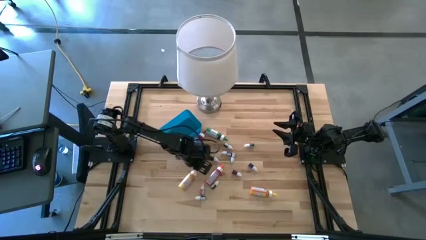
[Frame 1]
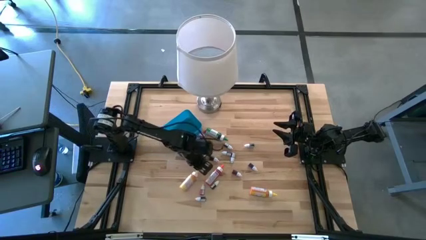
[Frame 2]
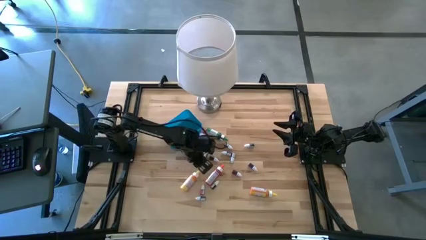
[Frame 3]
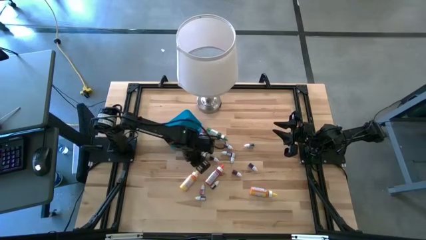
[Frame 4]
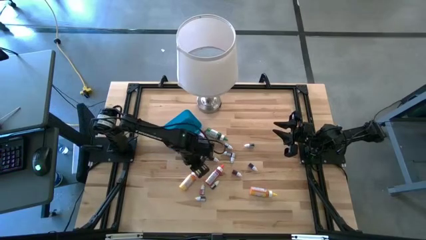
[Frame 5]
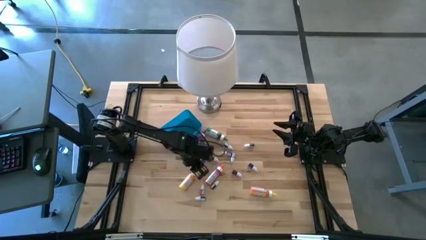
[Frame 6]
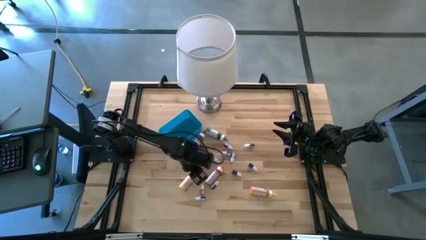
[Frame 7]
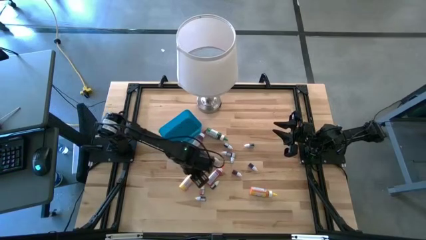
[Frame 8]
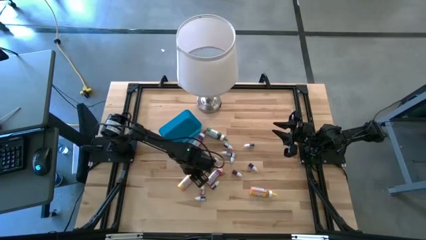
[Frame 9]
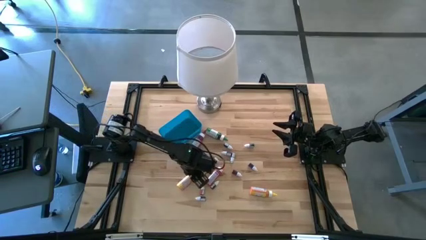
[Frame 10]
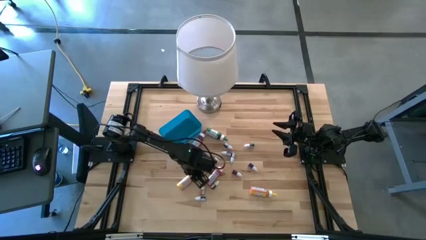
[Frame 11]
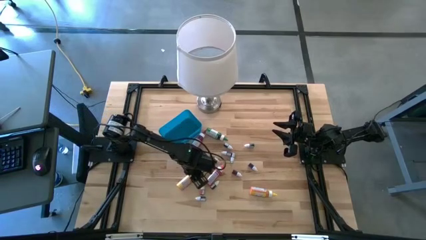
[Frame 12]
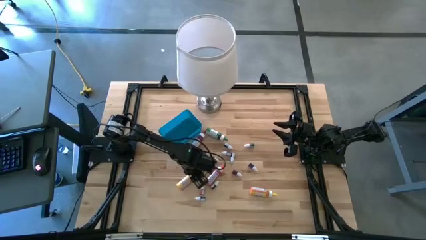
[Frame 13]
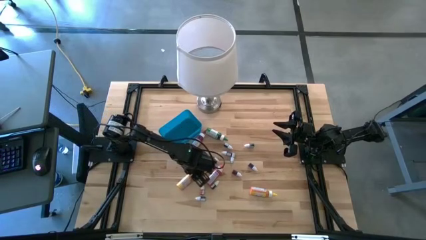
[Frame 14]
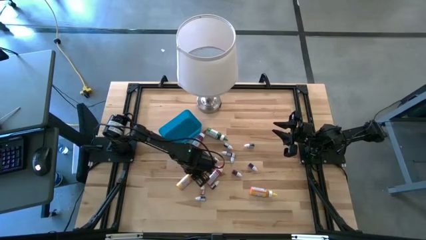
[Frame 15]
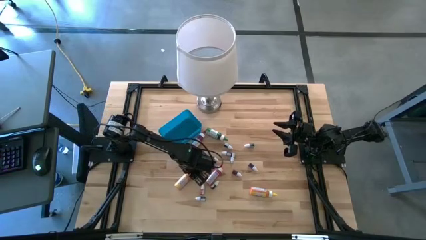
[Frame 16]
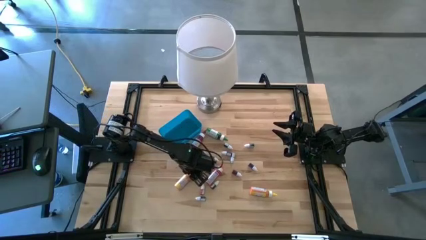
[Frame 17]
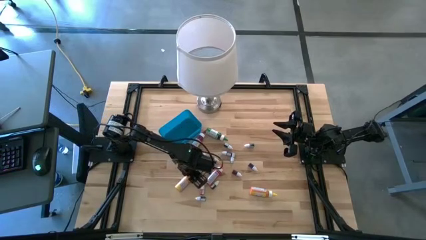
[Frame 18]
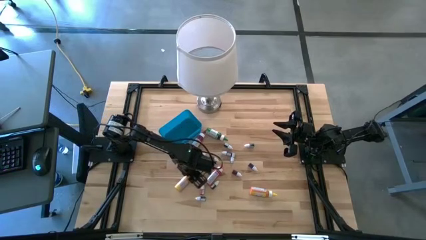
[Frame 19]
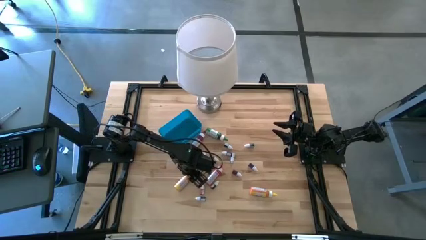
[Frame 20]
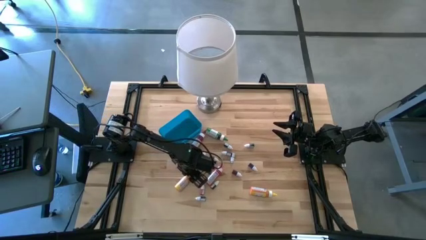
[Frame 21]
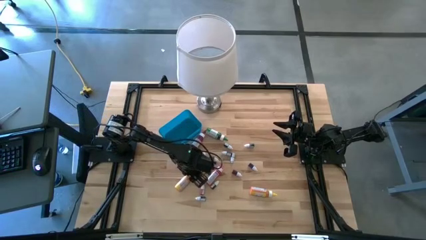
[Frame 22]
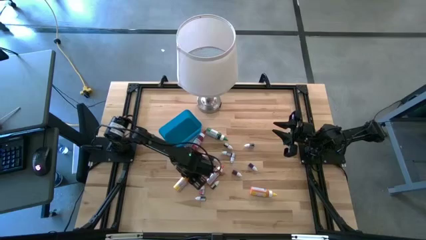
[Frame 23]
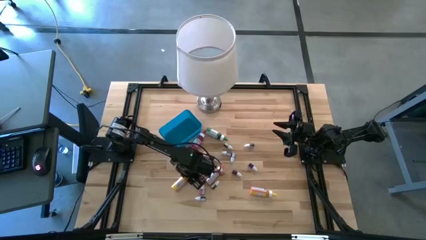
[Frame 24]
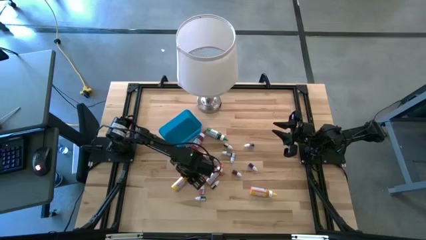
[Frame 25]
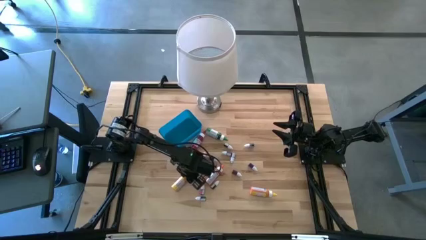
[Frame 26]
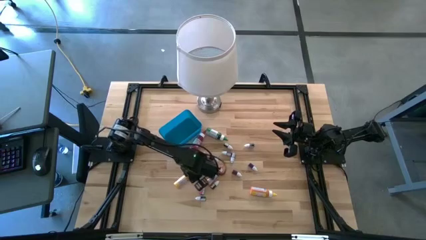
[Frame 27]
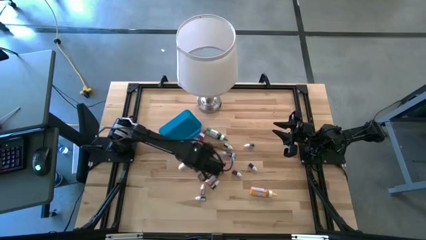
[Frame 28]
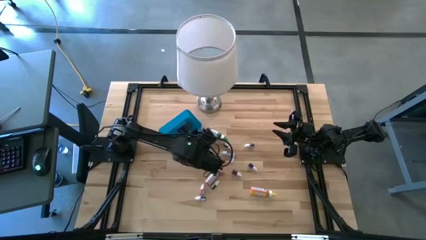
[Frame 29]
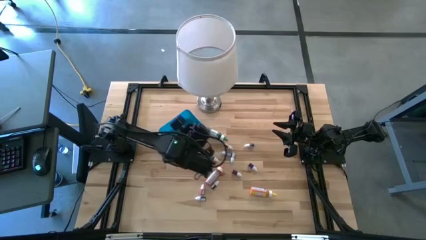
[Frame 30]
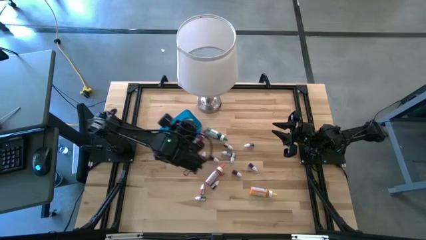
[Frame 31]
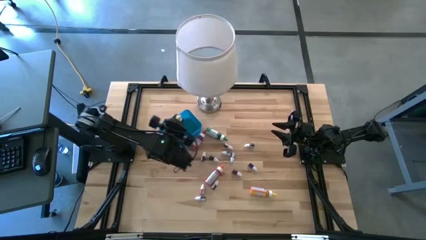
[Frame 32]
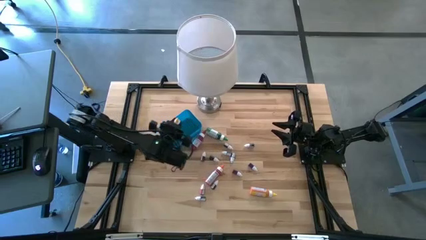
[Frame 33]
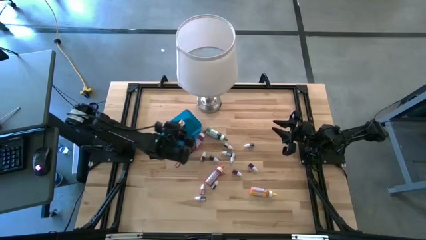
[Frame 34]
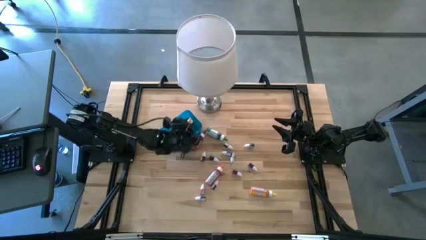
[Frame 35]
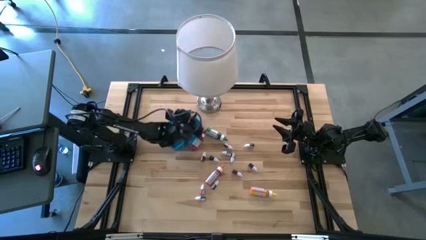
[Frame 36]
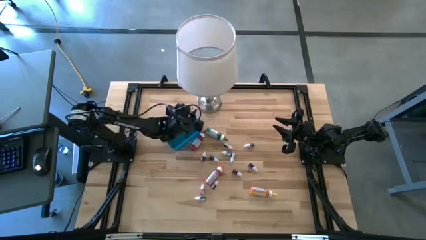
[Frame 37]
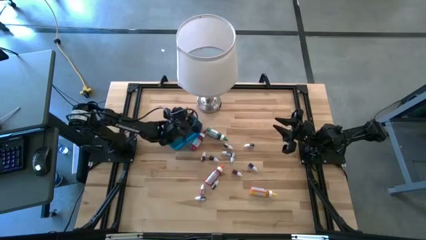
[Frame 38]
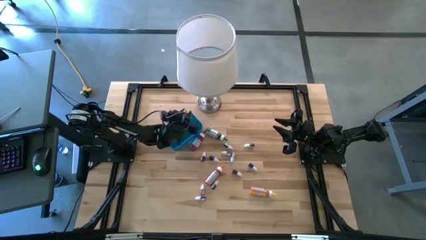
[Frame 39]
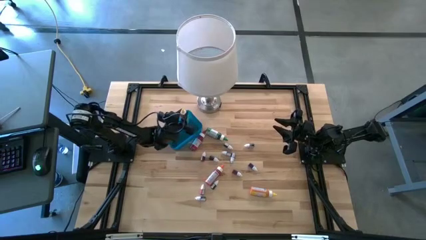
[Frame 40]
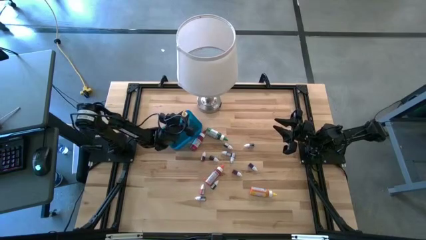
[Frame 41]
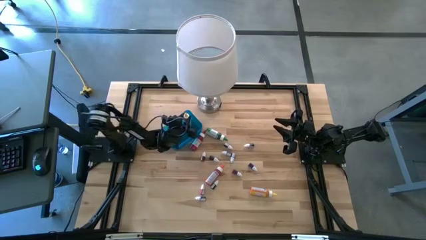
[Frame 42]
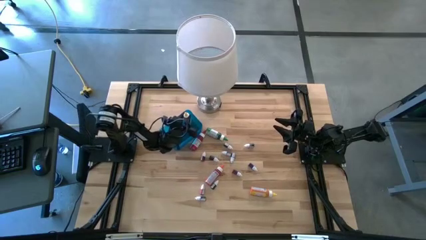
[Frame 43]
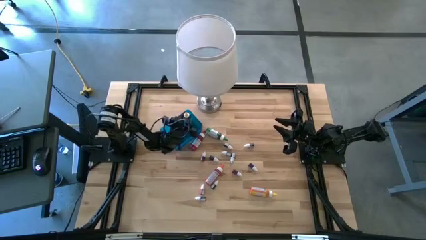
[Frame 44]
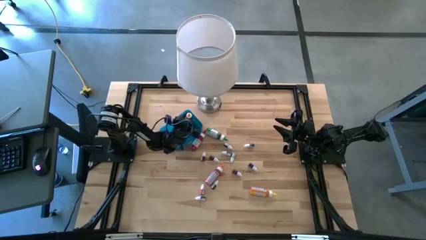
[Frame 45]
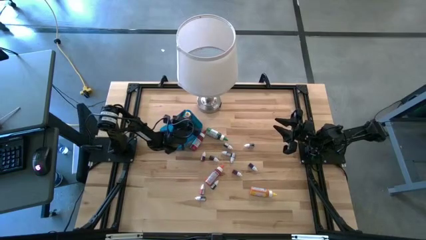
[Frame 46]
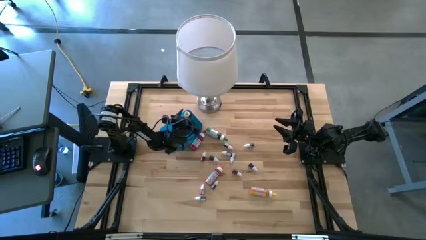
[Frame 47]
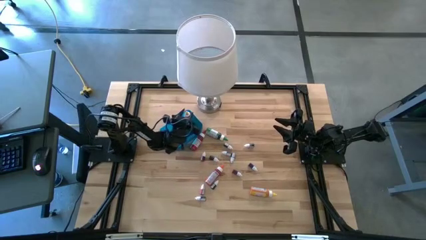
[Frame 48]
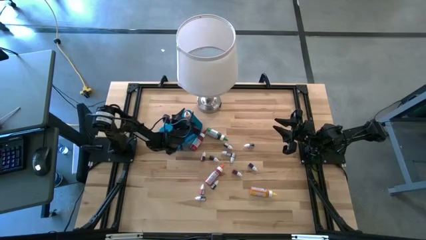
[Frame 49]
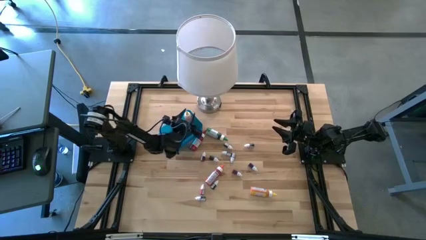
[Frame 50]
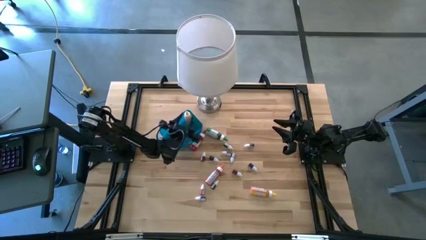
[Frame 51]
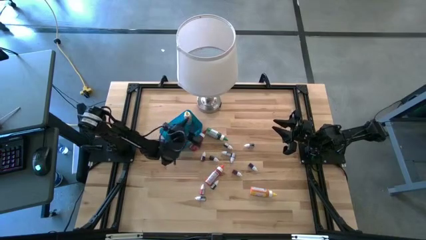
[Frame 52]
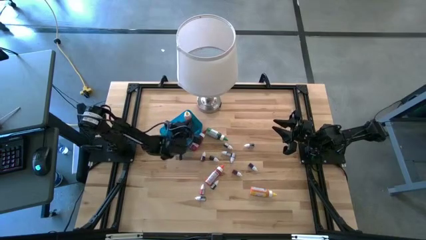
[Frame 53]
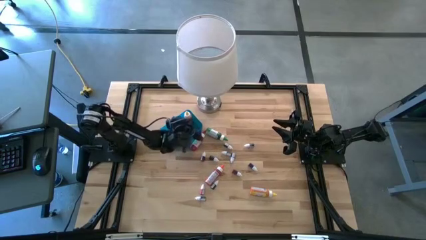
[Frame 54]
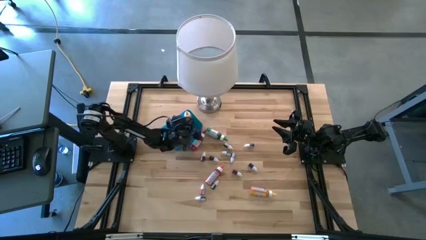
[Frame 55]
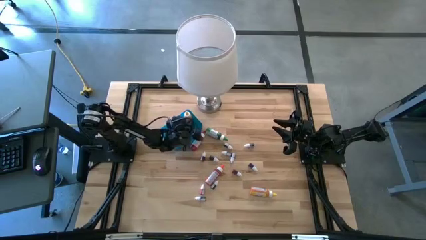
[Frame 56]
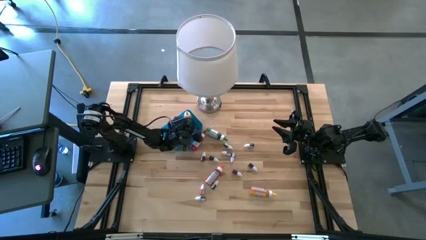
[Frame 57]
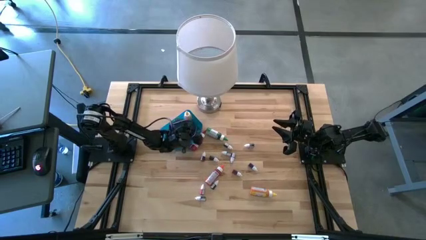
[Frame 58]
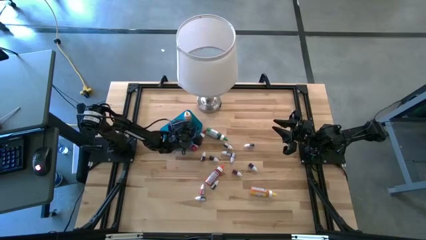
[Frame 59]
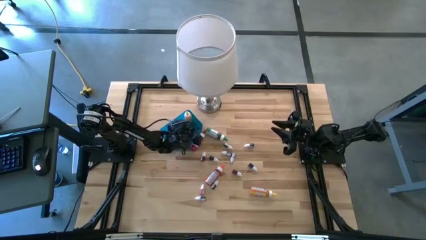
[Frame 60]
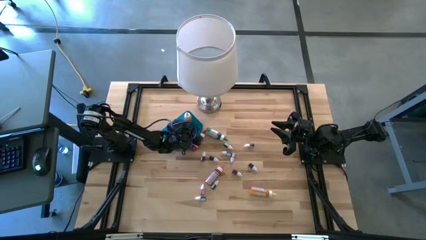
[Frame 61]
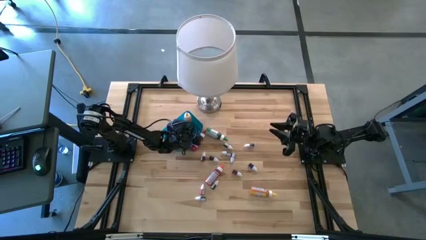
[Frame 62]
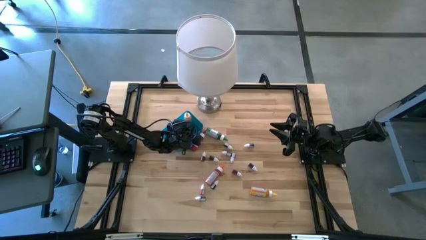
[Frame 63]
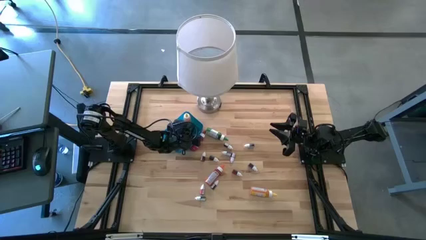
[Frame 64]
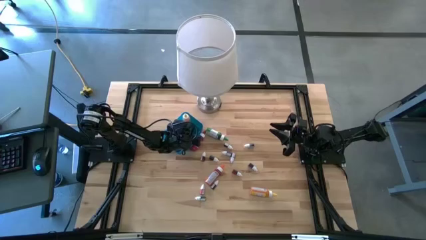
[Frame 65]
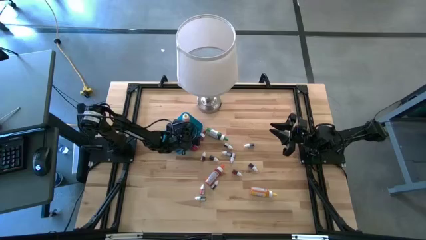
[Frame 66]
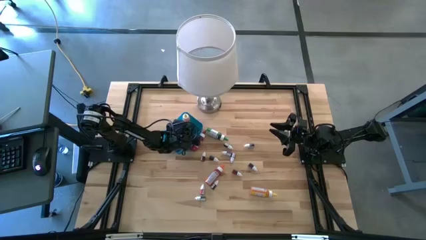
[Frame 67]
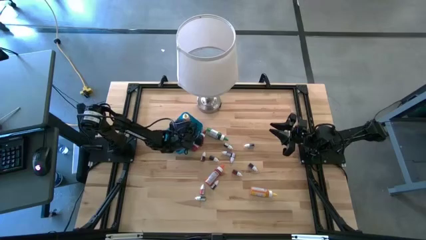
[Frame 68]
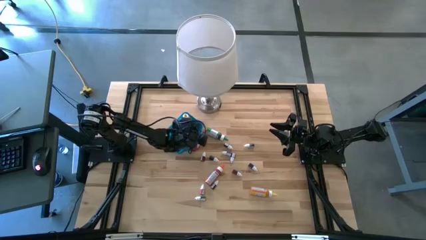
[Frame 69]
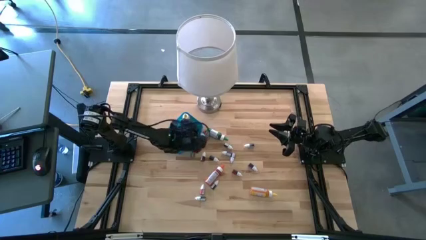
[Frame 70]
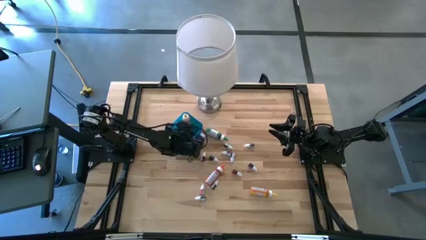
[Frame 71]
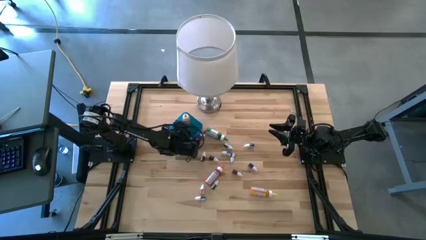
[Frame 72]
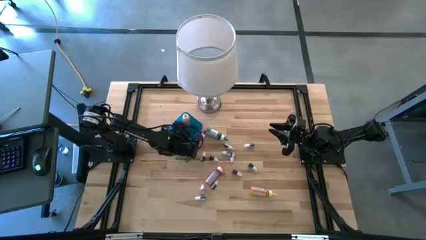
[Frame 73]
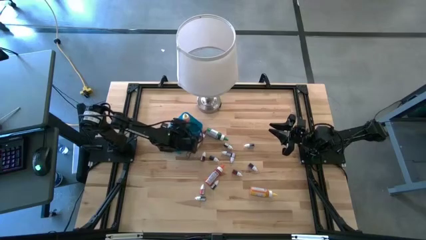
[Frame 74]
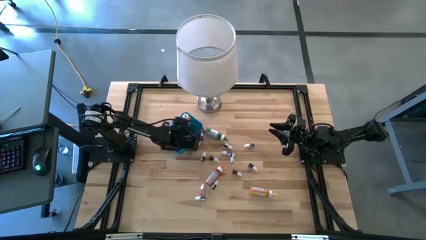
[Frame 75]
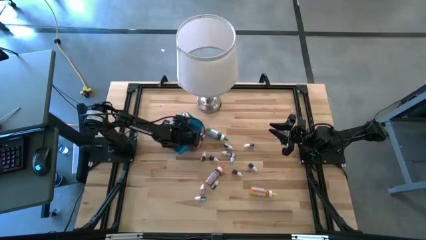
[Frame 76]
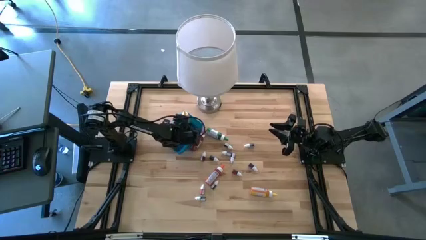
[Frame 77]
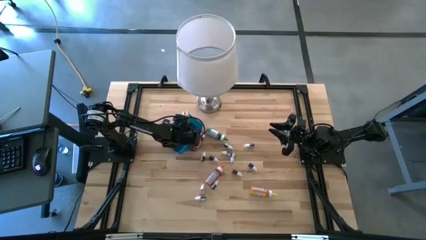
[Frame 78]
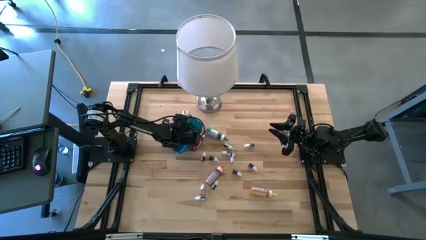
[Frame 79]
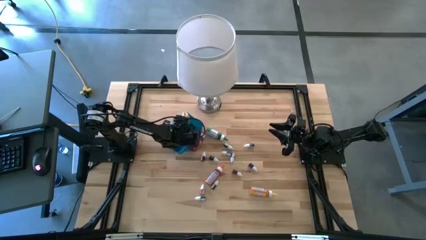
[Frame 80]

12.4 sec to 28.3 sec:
Task: Pick & Place food coloring
Put the large yellow food coloring bottle into the blue bin
